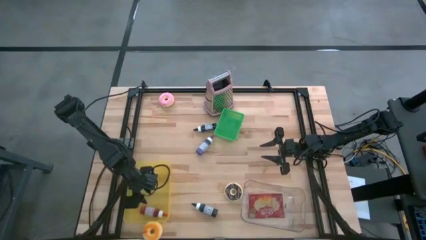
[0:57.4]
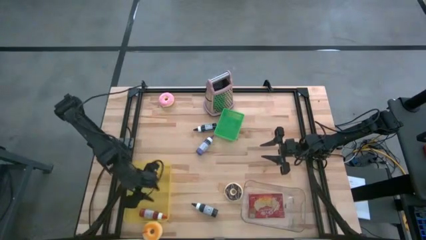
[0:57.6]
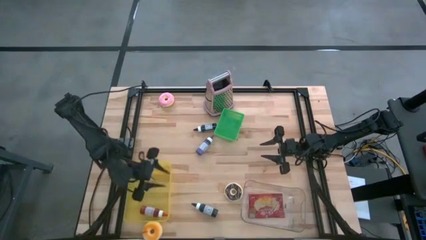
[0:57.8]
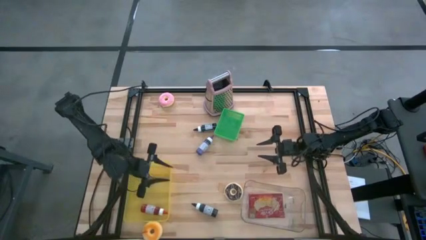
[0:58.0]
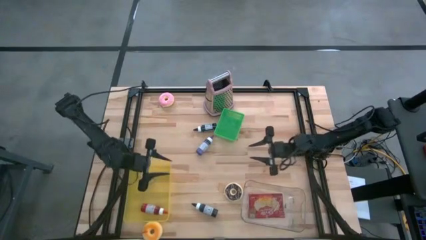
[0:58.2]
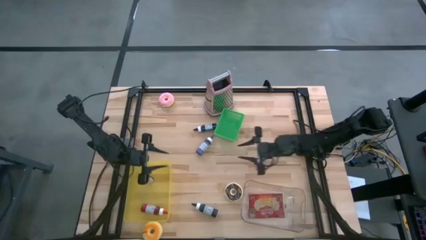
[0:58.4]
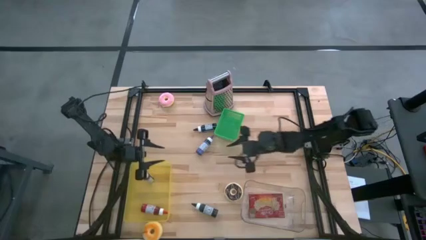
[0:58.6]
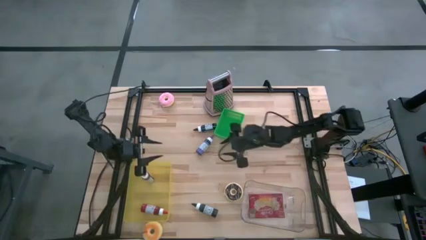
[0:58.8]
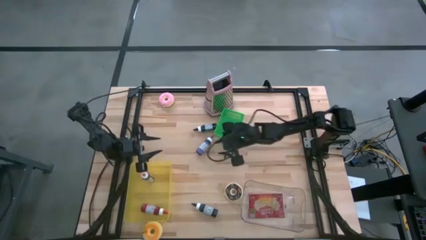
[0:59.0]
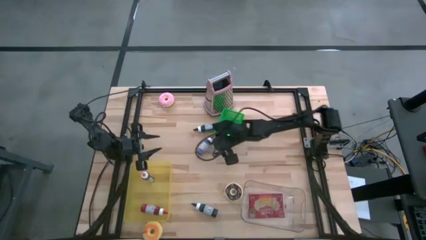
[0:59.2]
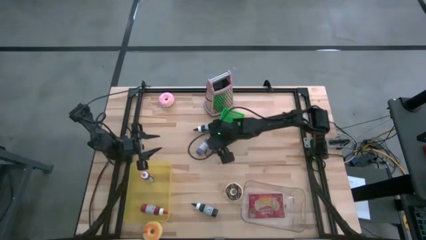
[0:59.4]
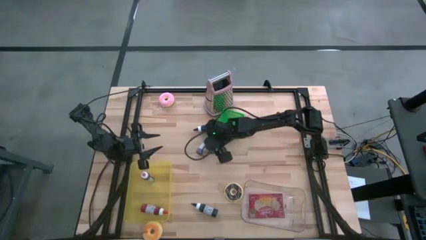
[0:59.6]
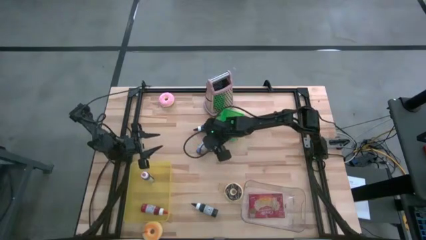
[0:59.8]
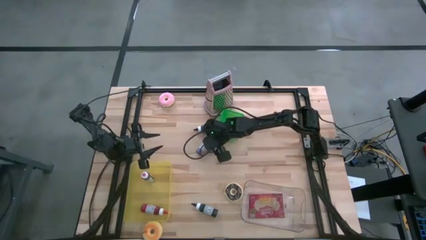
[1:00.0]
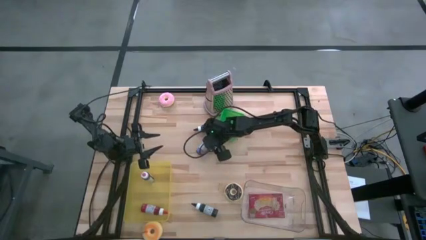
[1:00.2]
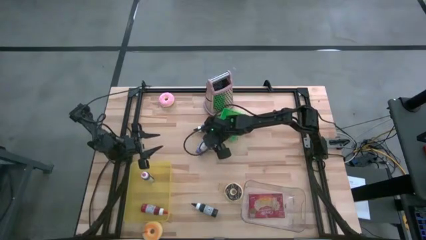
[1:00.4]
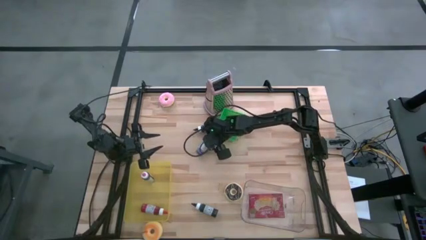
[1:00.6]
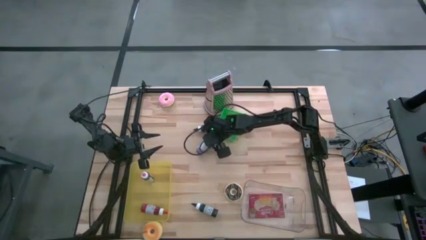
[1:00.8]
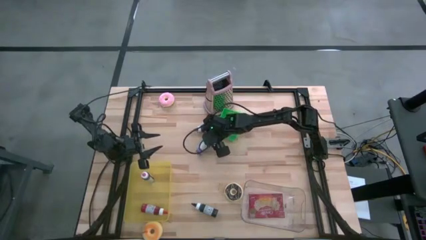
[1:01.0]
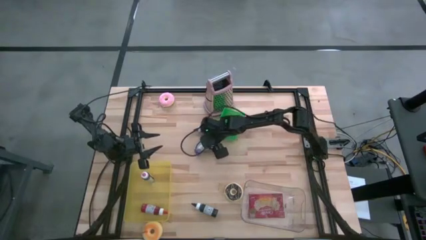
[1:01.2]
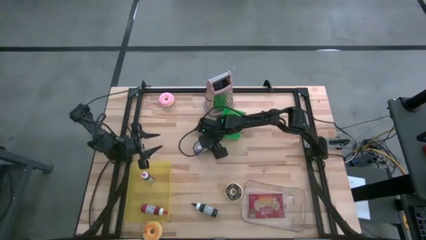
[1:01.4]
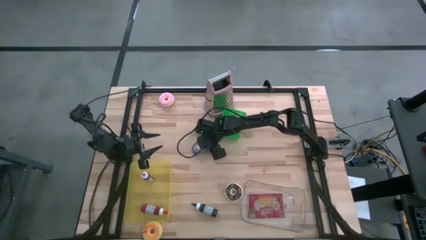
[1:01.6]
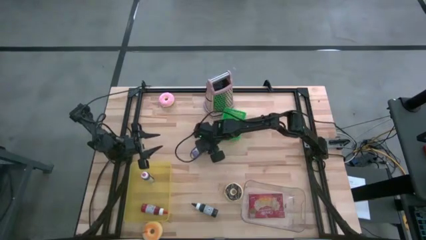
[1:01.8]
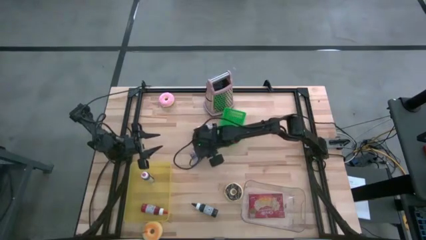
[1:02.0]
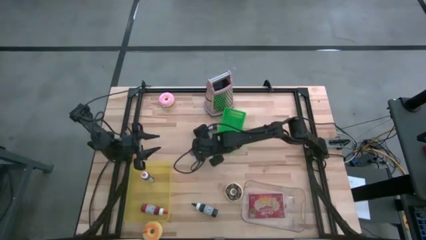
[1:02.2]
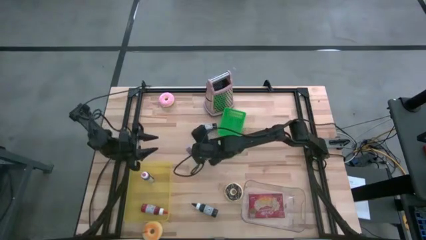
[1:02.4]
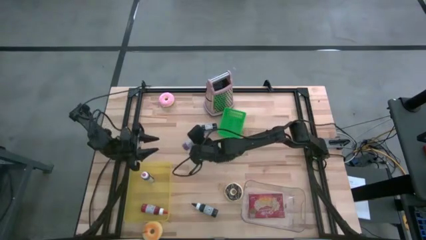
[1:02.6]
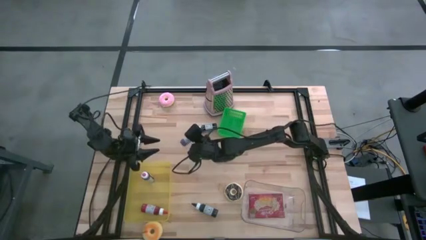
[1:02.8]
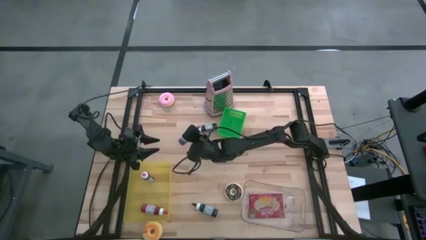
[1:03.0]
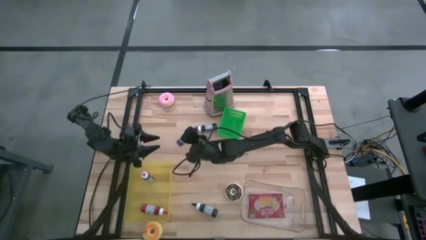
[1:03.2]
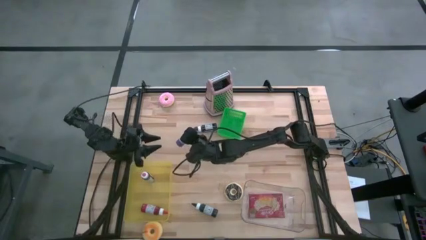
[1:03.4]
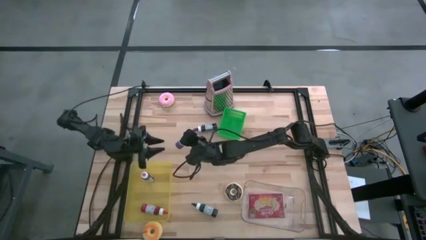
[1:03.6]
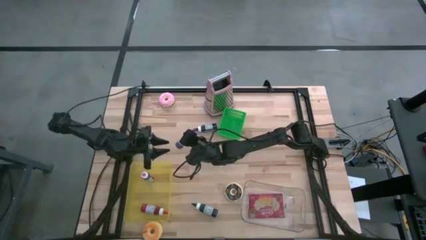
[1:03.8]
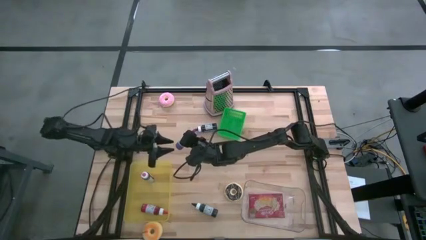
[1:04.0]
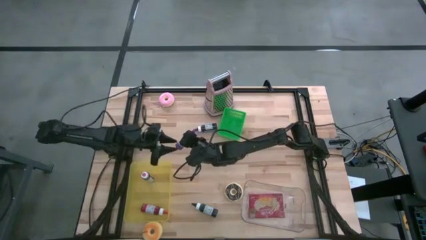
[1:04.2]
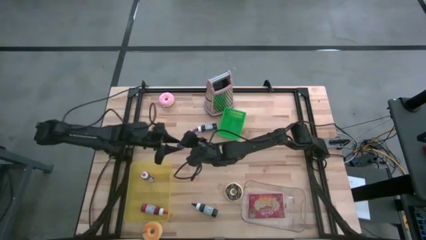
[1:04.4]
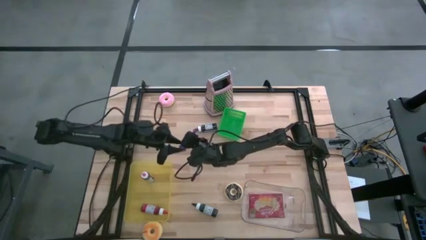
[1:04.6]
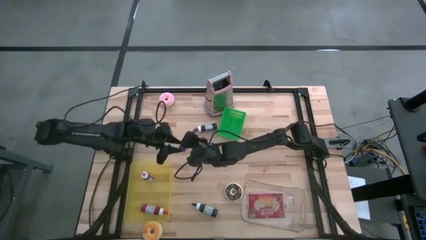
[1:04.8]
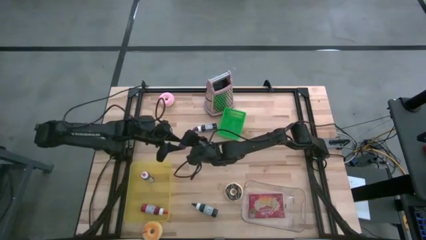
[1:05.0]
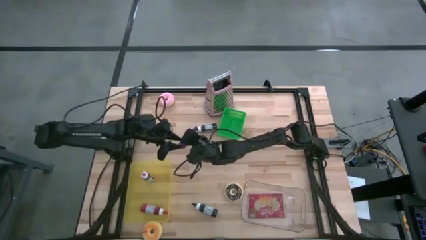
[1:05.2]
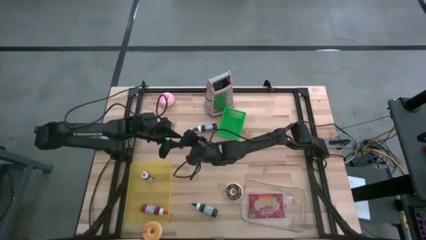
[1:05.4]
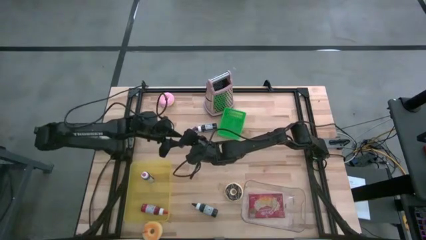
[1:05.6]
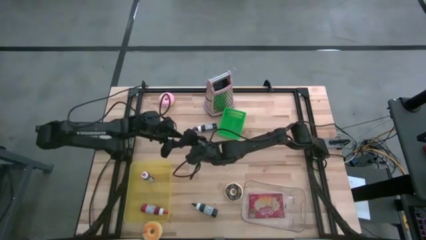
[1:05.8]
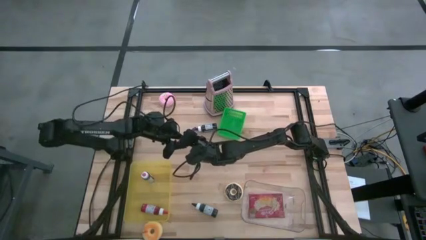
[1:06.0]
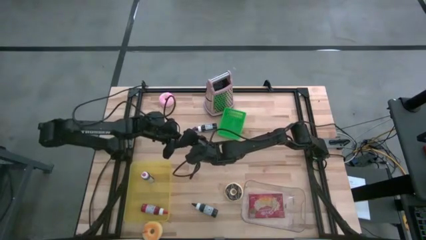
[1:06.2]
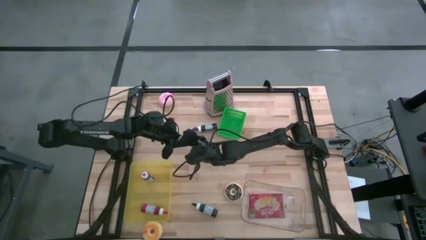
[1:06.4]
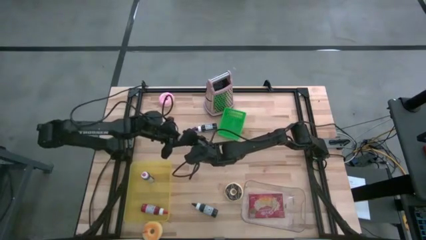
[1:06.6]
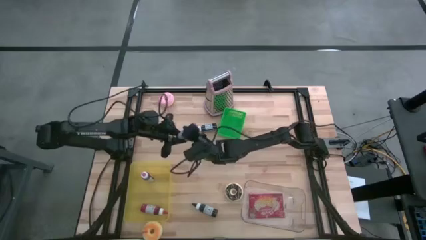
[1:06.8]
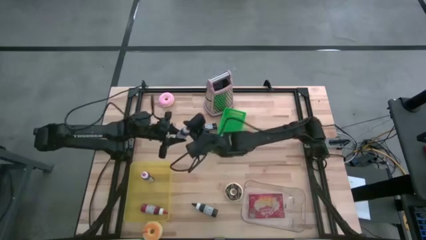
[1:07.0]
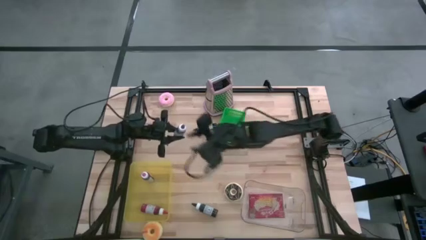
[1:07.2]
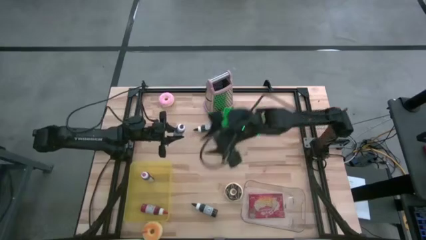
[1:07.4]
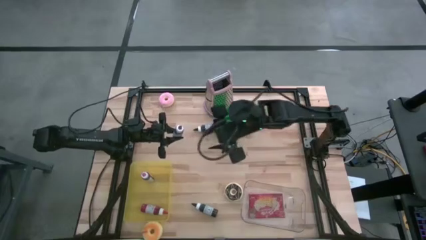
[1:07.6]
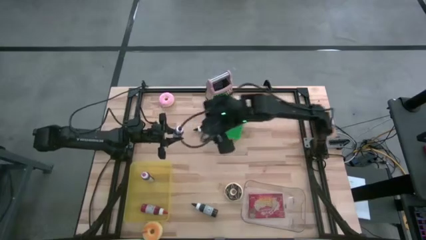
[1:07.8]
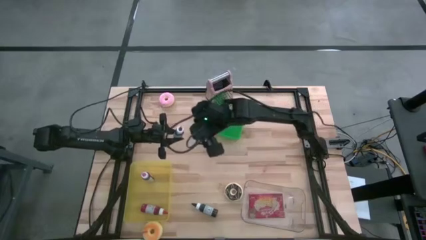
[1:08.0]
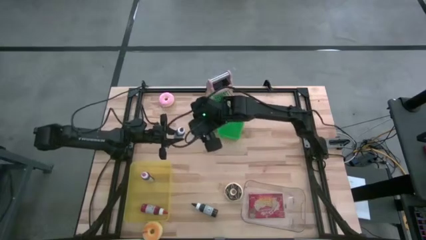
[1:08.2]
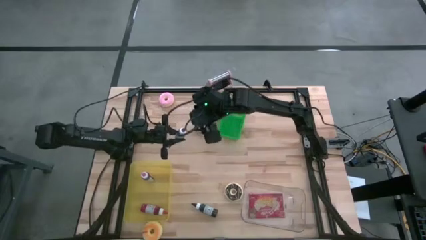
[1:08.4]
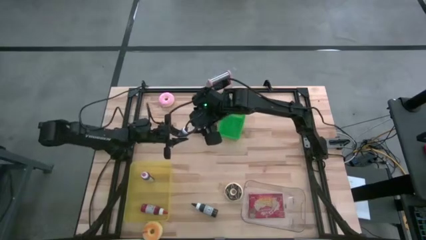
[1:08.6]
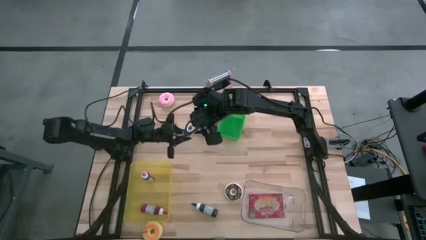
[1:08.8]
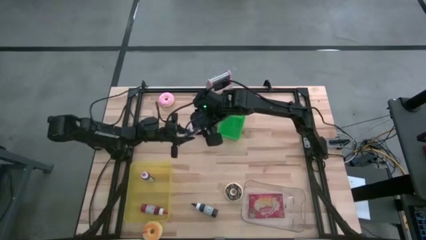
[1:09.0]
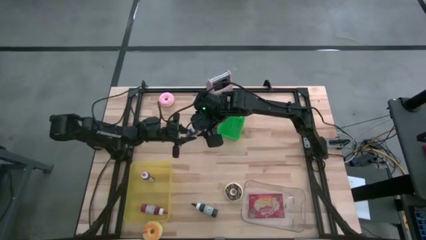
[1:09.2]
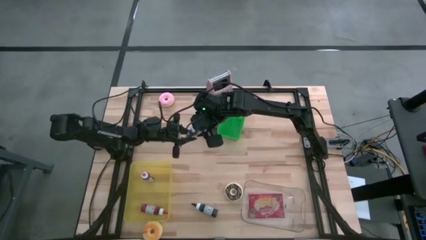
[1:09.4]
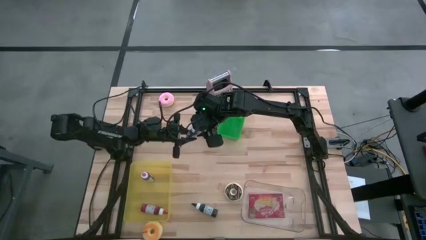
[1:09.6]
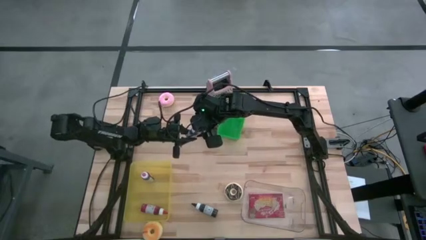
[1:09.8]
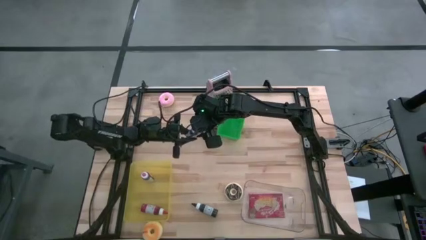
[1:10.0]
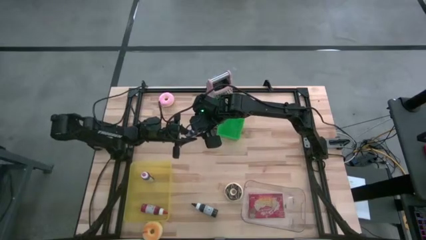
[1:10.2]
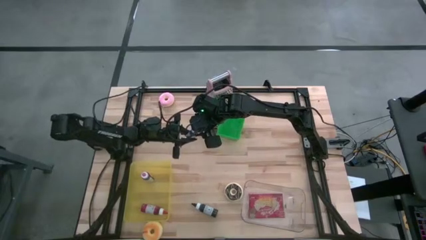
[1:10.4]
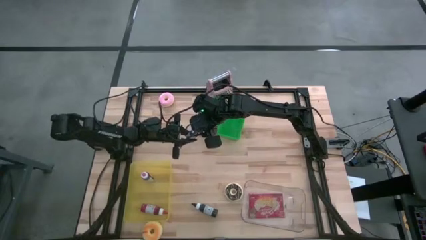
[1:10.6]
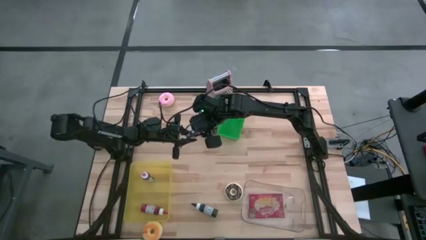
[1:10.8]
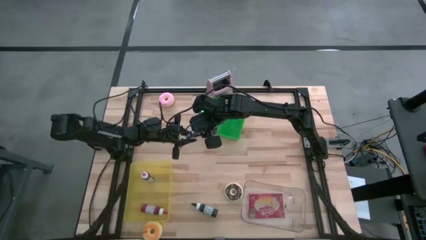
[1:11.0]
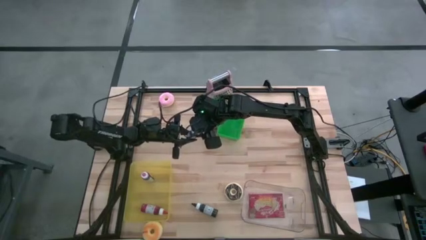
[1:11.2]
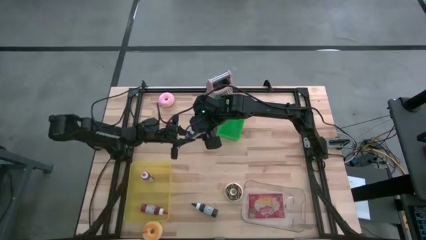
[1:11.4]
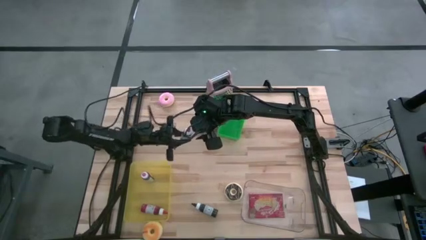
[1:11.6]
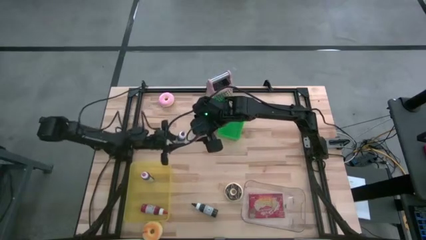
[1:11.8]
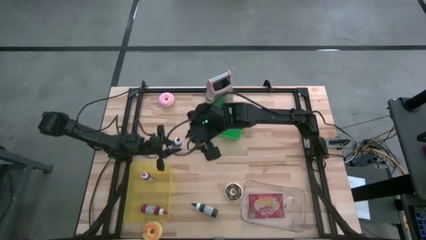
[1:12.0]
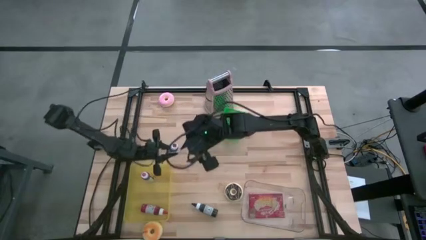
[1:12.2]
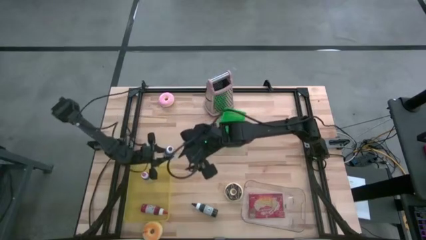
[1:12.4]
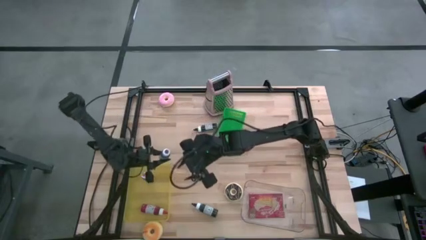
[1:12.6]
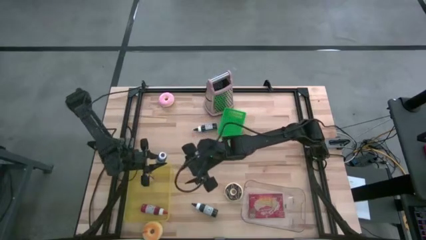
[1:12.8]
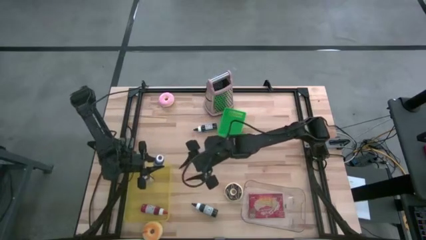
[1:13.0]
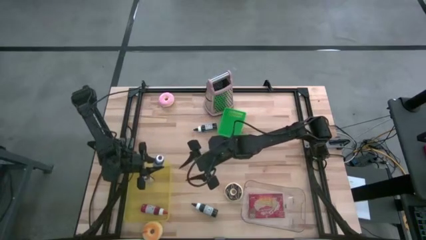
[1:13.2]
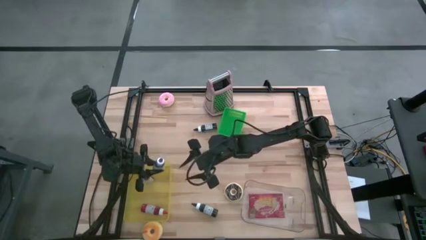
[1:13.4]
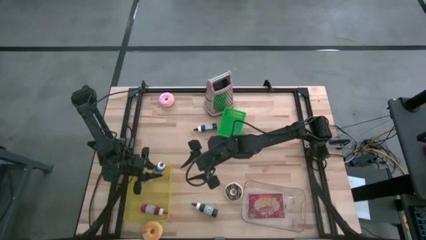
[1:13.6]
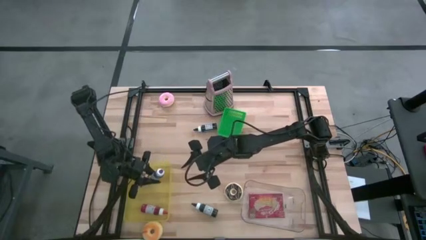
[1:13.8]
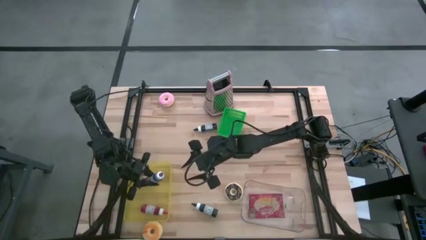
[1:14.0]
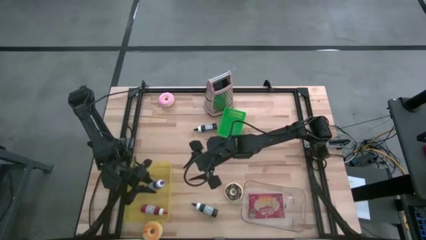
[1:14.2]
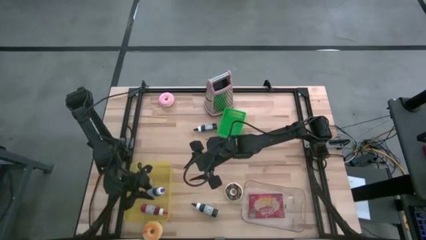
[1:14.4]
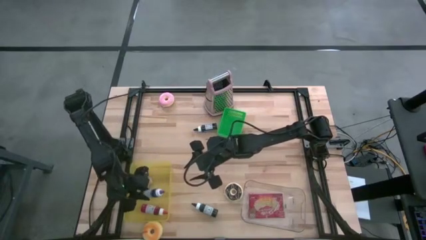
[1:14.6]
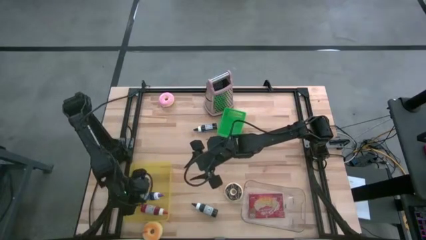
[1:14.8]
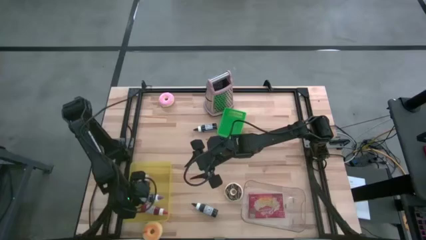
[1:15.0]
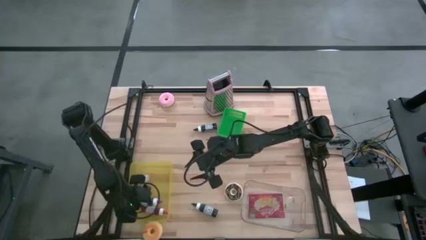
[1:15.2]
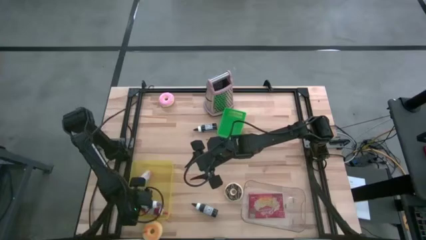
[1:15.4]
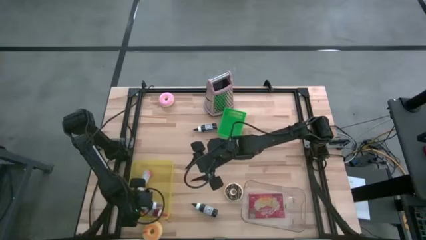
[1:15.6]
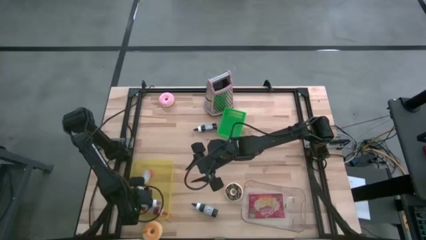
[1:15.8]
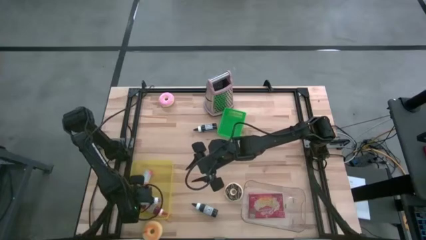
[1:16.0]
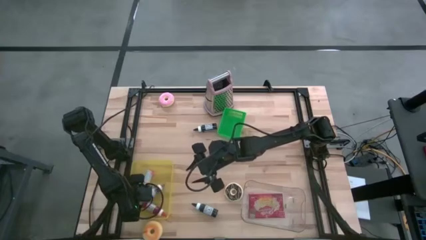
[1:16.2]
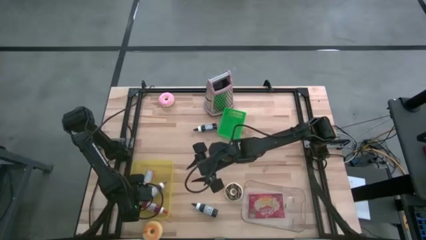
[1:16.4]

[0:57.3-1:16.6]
Task: Pick & Place Food Item
Put the violet ink bottle into the yellow bin
